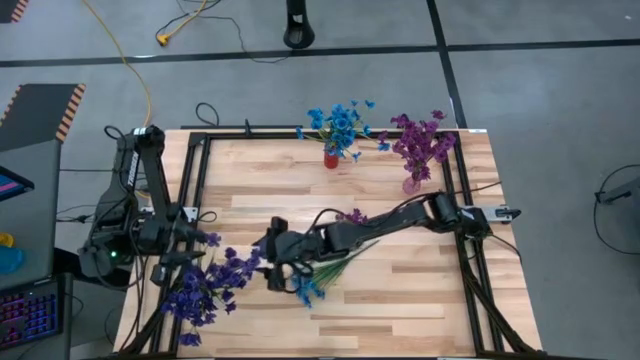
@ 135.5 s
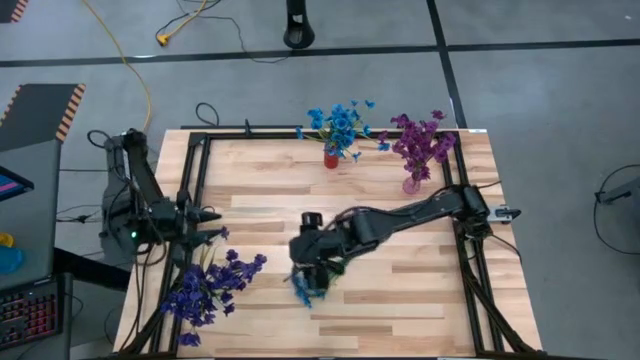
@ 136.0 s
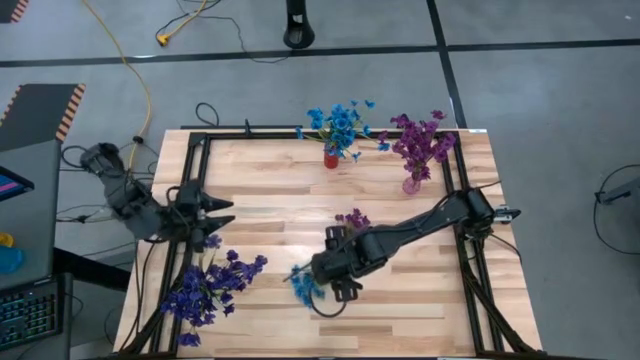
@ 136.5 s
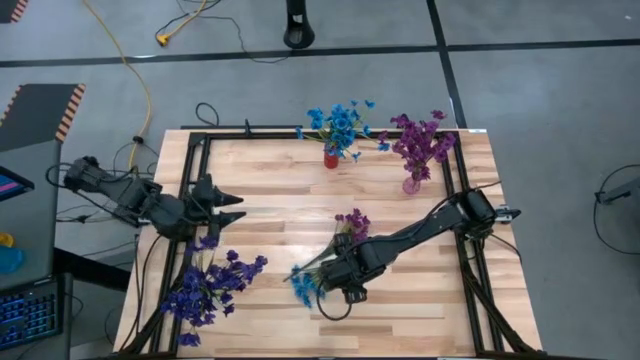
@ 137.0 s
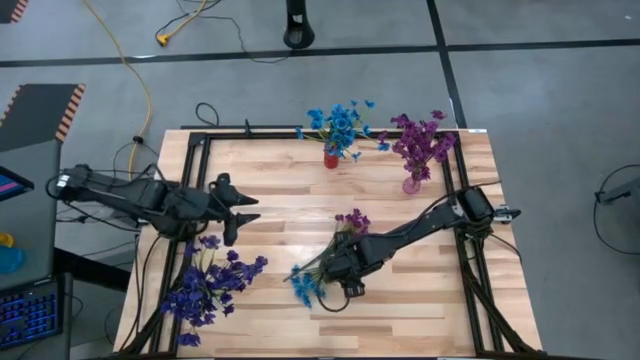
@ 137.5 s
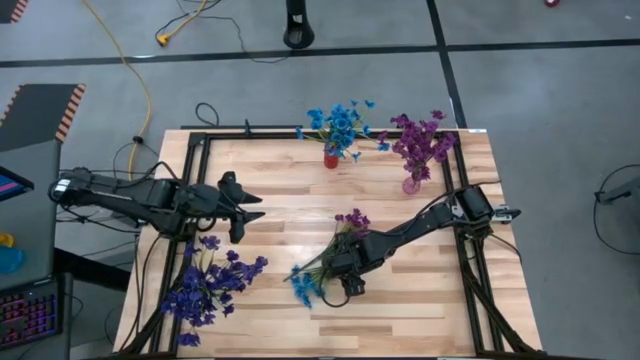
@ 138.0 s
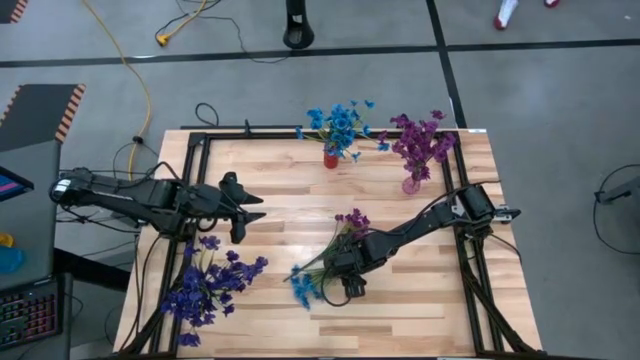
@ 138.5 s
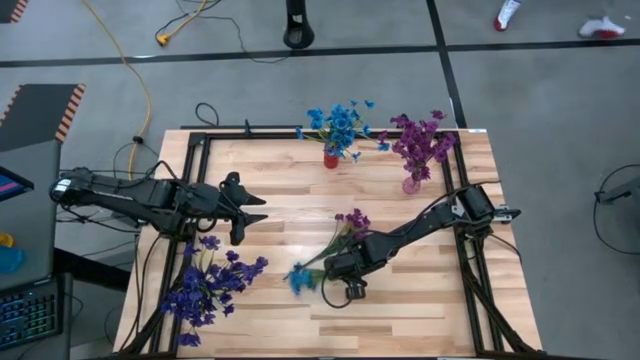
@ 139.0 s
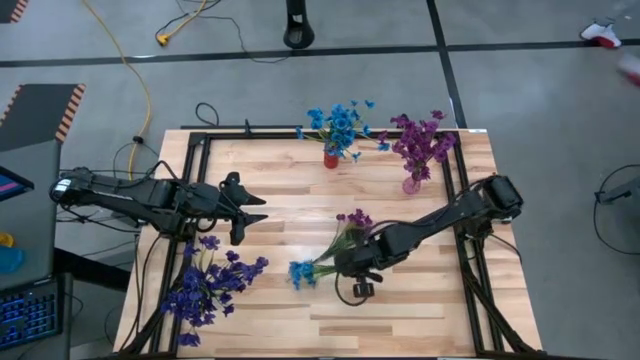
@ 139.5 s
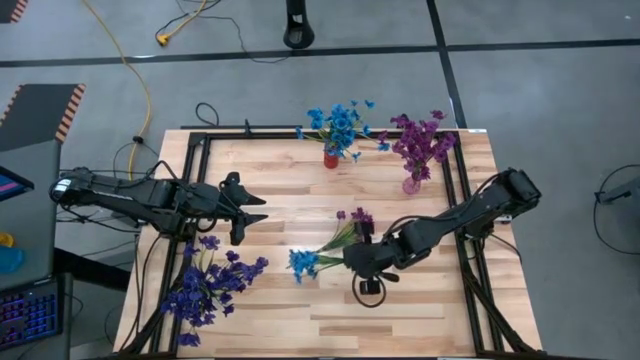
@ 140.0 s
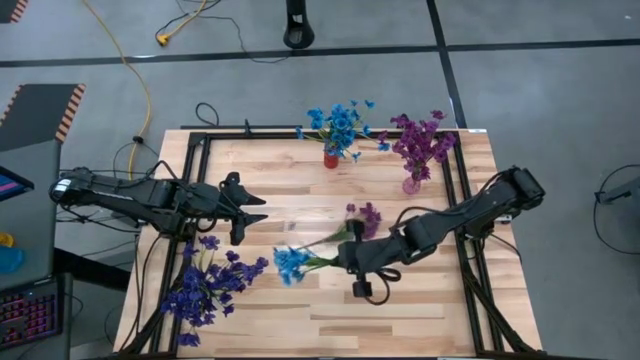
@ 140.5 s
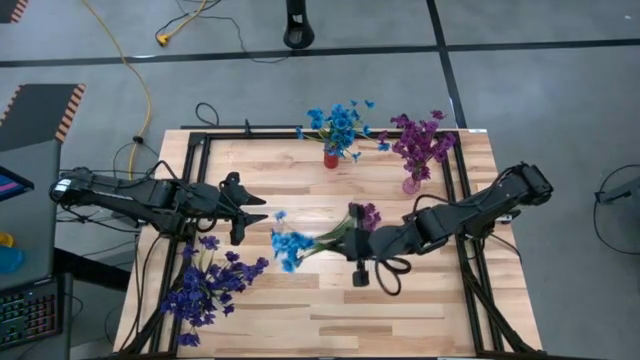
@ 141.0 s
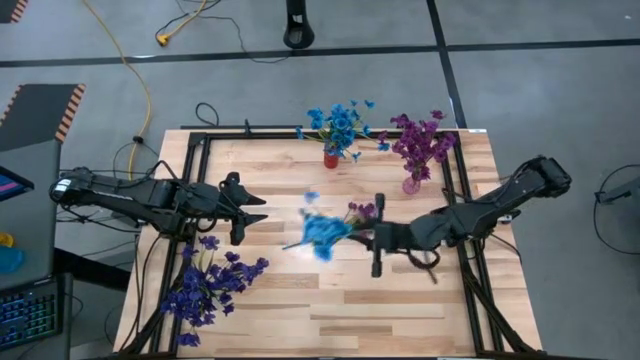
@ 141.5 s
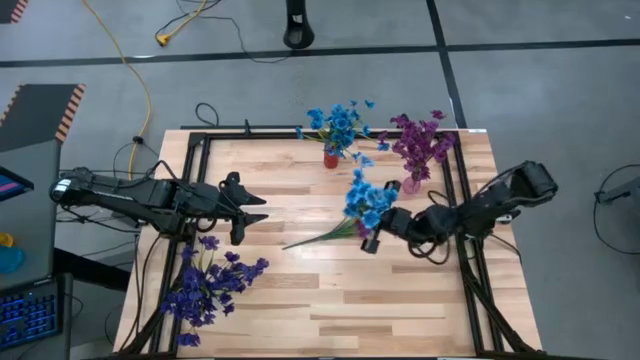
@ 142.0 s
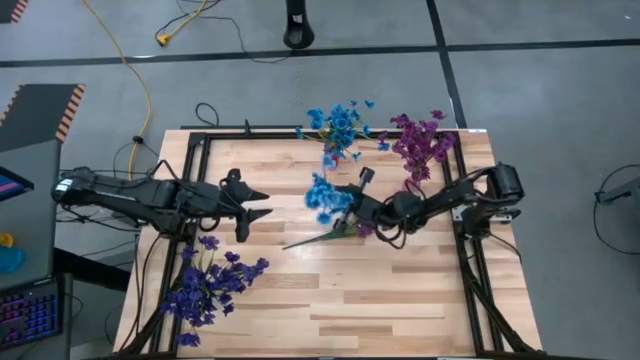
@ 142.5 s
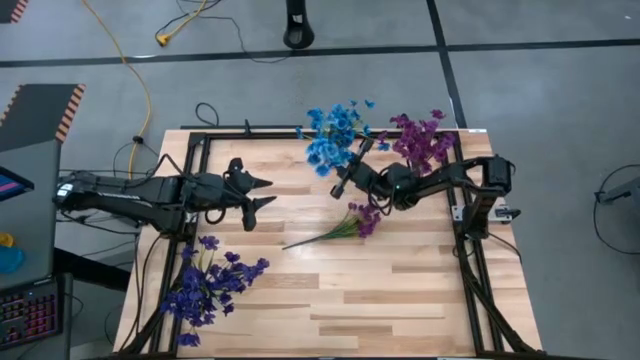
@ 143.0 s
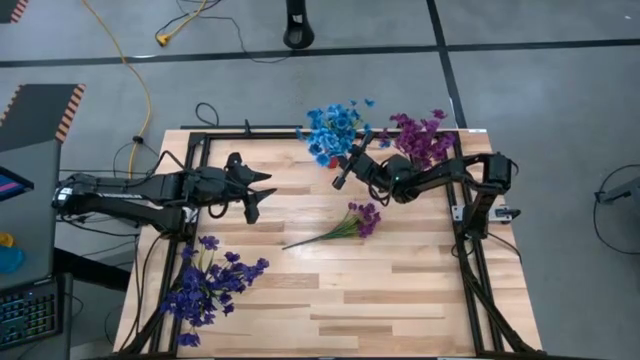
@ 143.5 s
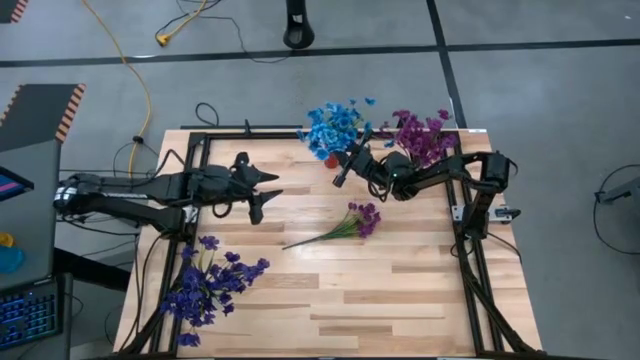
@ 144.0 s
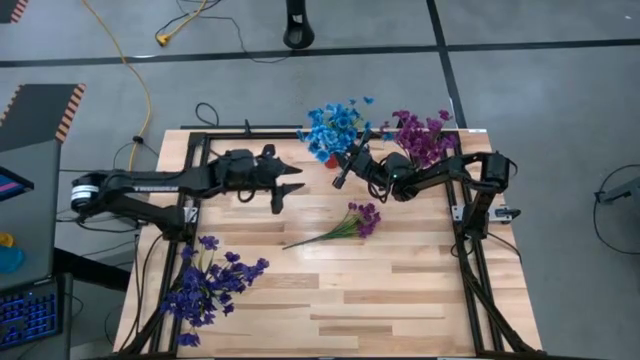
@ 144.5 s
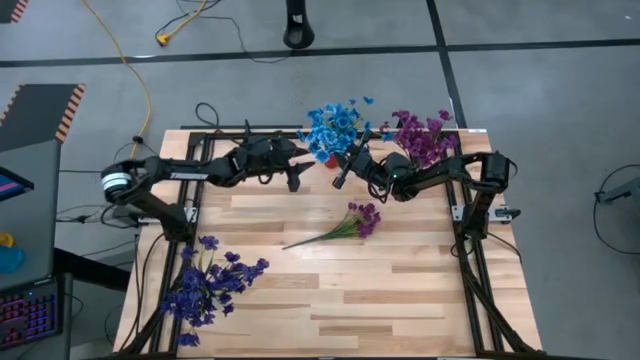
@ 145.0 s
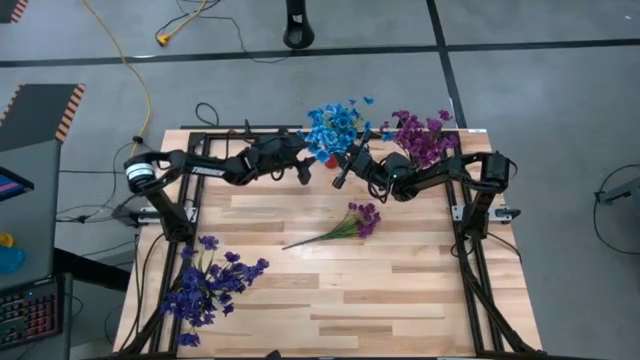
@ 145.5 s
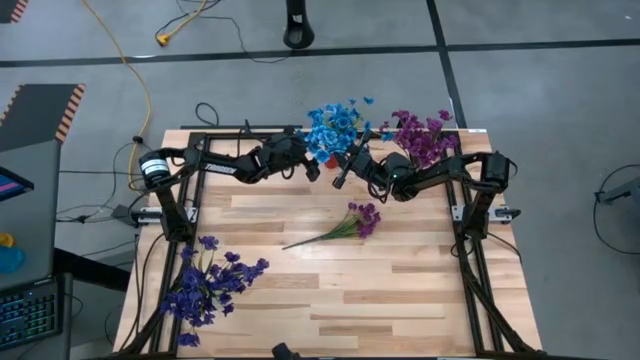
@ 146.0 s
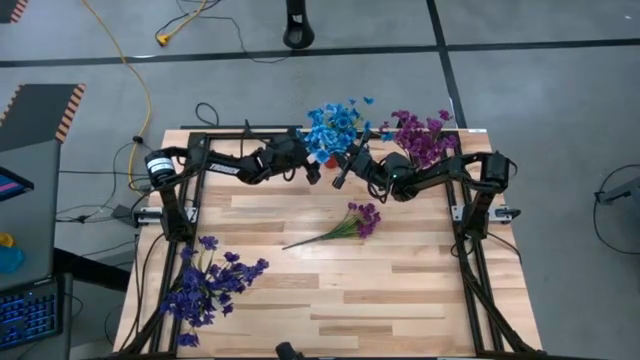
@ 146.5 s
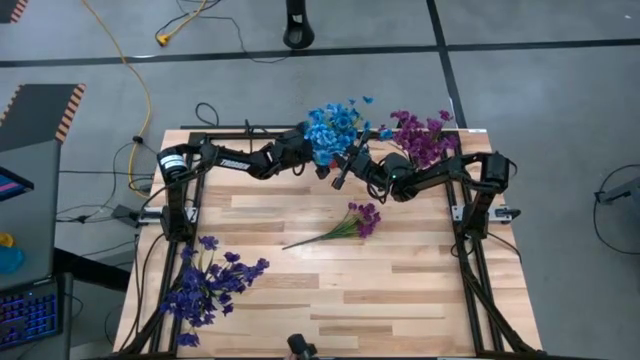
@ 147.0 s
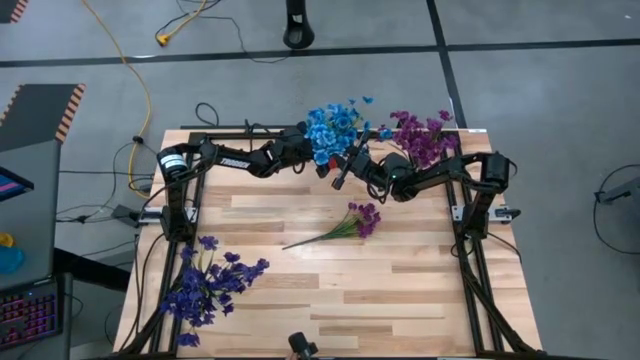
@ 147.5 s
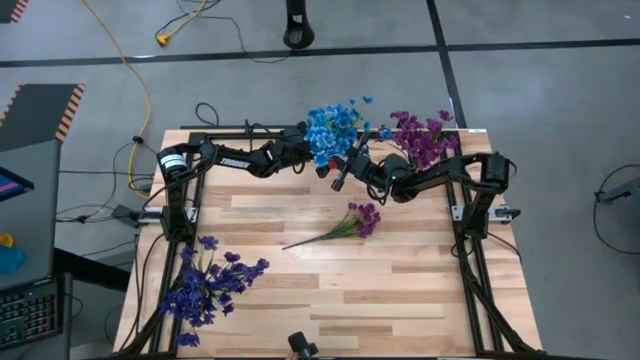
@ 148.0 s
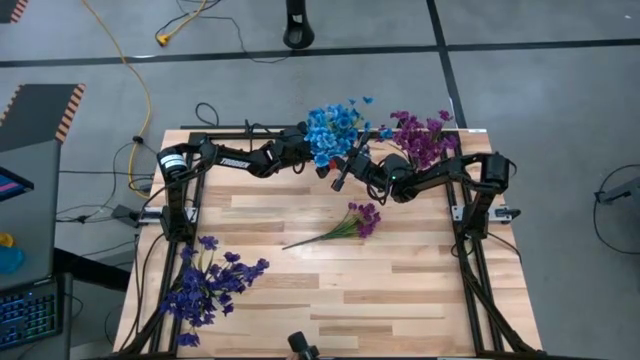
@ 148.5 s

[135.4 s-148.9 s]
Task: Sort flowers into vase by color
Put the blue flowers into the red vase

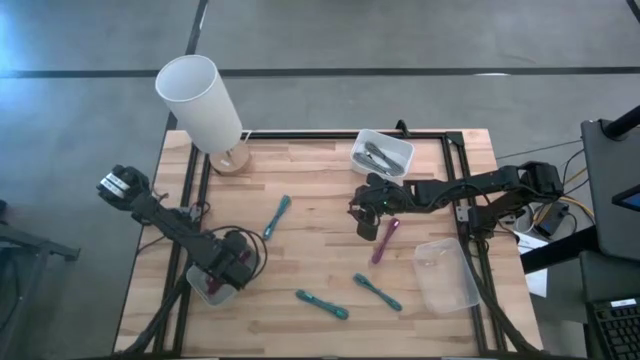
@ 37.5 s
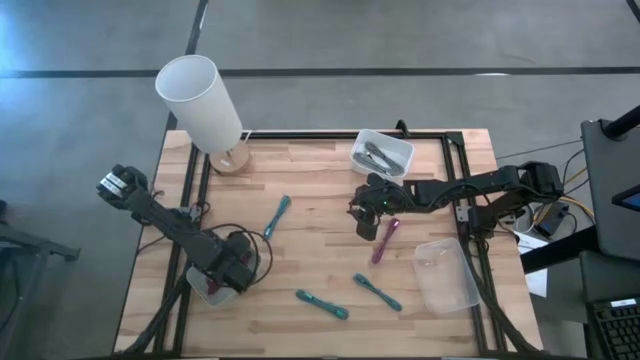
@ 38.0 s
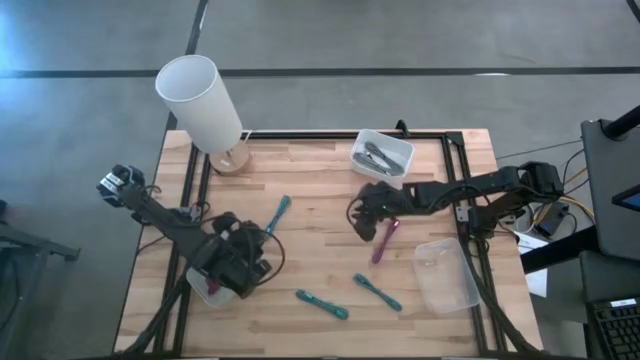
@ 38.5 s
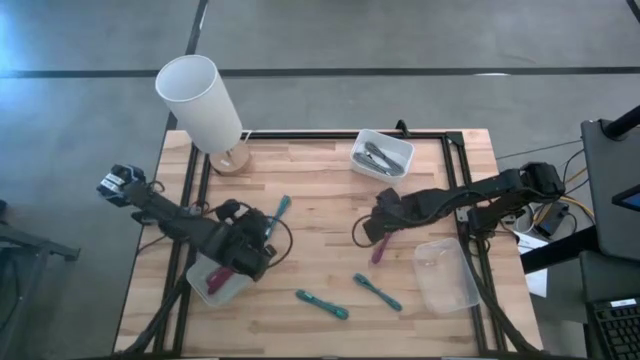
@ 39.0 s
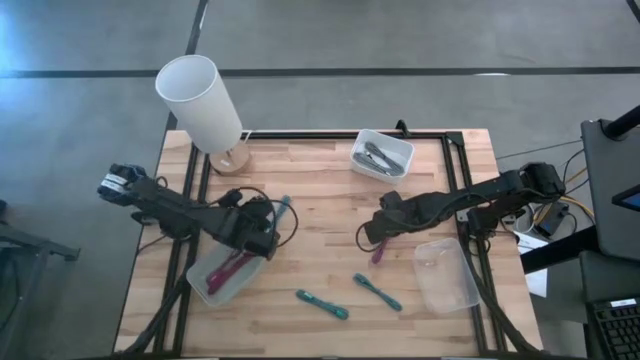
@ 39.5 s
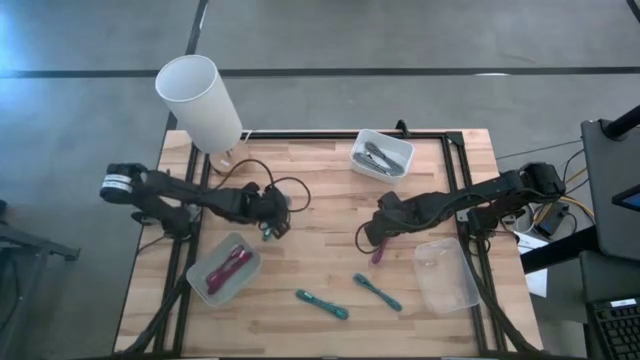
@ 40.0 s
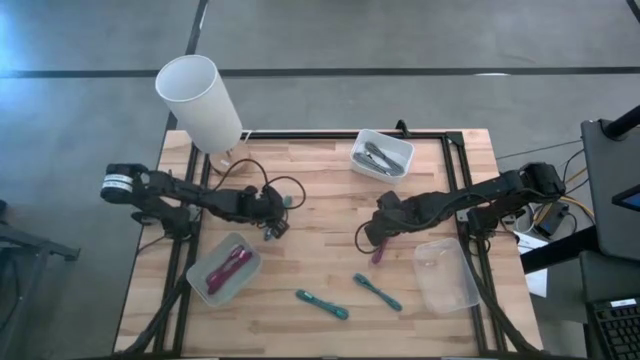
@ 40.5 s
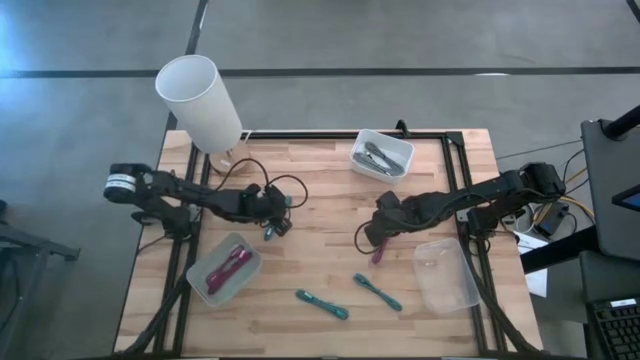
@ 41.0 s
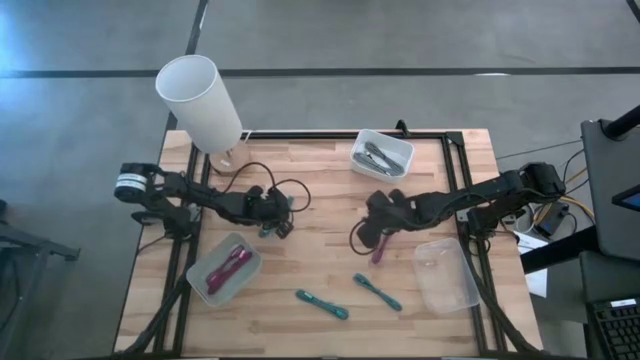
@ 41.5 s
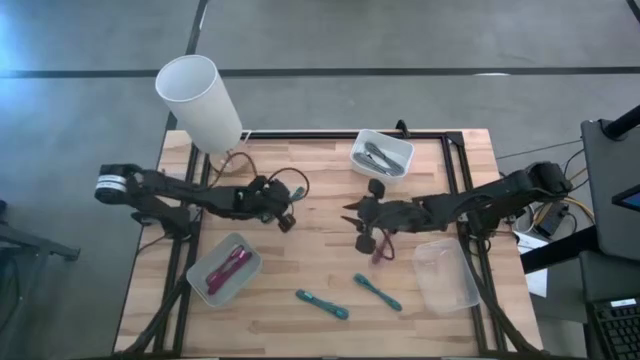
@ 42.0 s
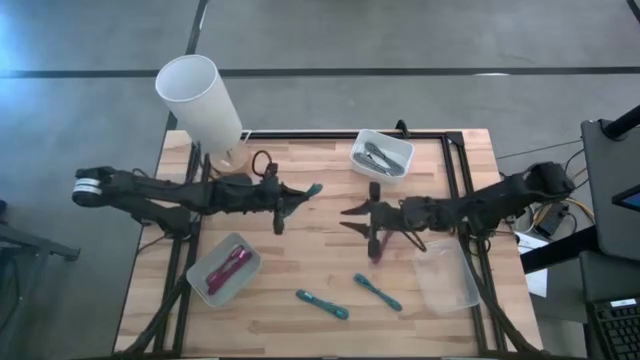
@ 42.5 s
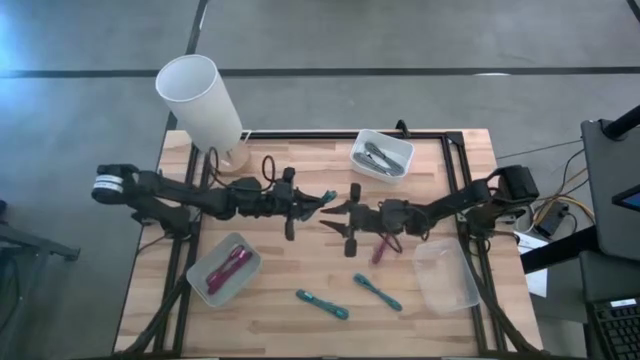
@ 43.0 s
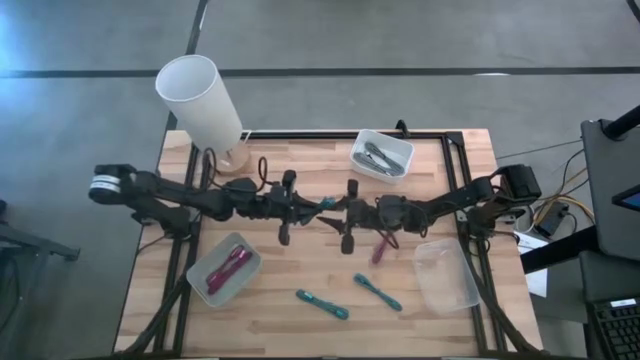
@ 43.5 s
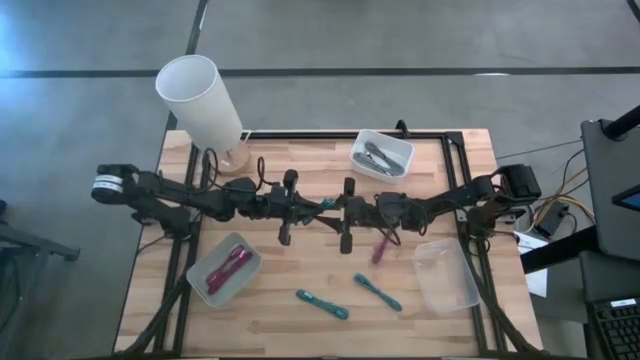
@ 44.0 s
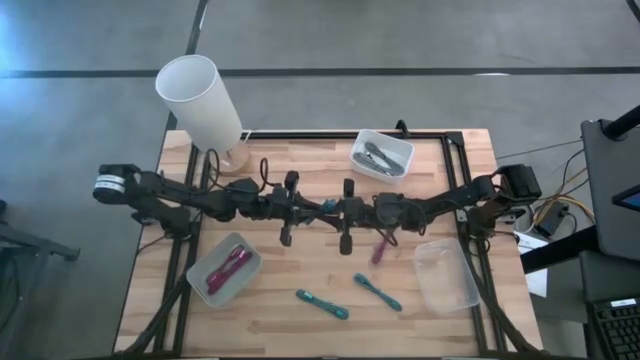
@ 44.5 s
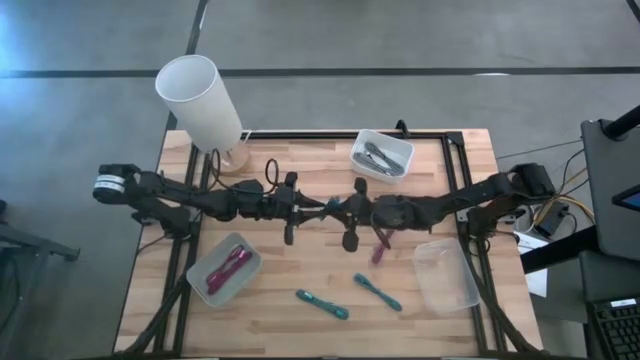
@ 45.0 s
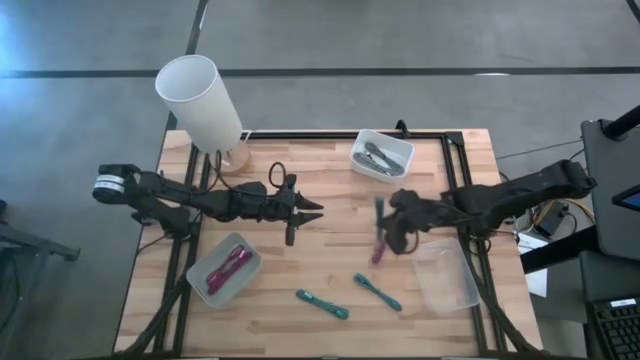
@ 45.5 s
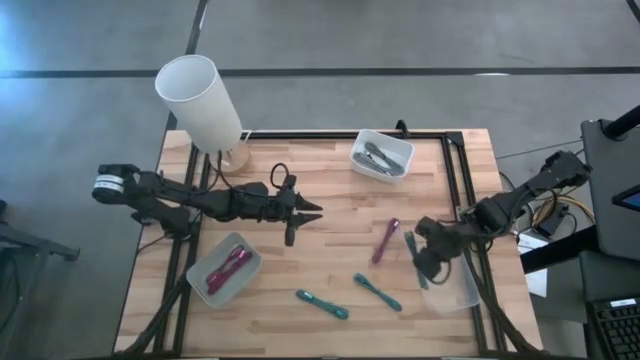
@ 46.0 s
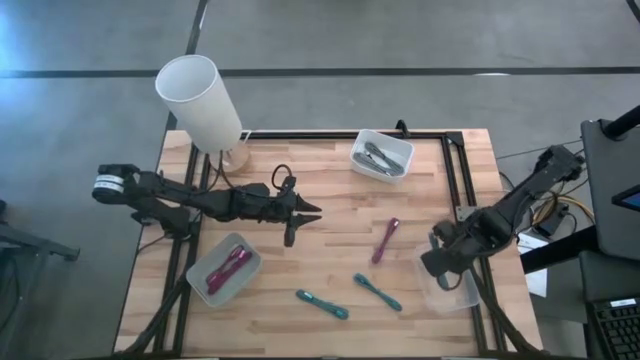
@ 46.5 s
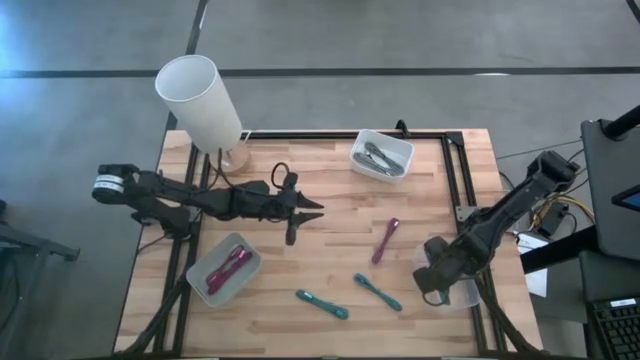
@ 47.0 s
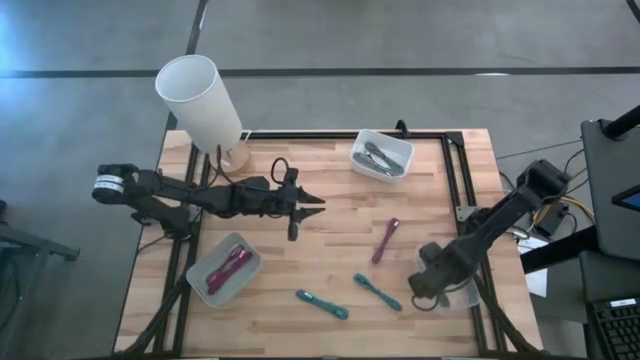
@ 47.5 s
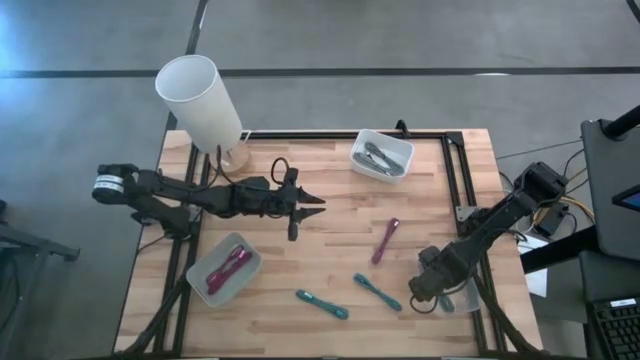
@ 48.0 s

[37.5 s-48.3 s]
Task: Pick & Place USB Port
Put the top blue patterned charger cable into the transparent bin
